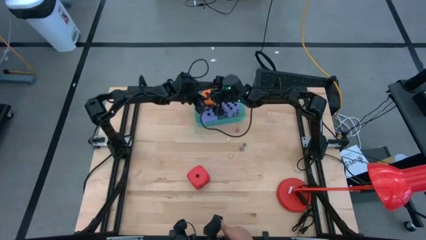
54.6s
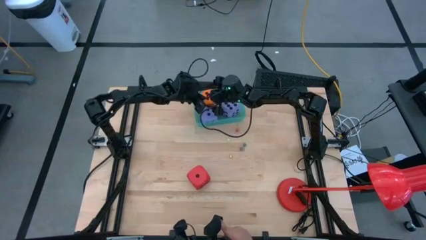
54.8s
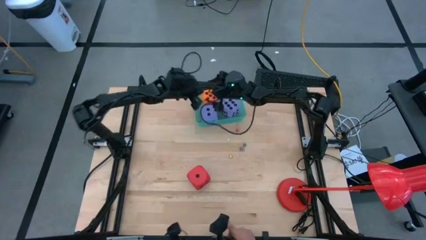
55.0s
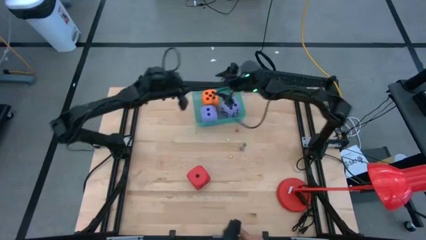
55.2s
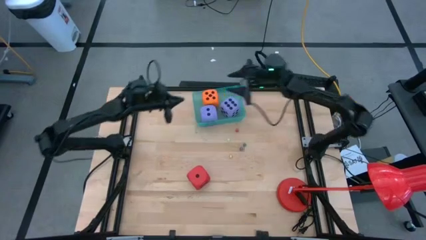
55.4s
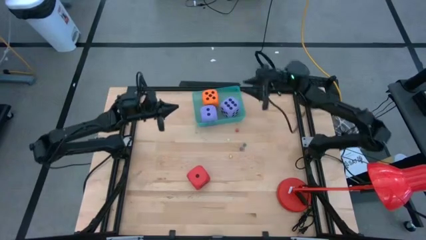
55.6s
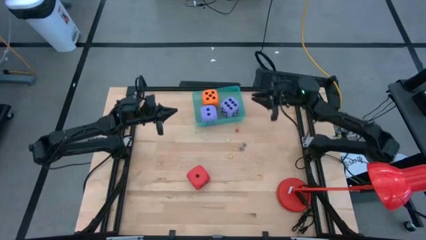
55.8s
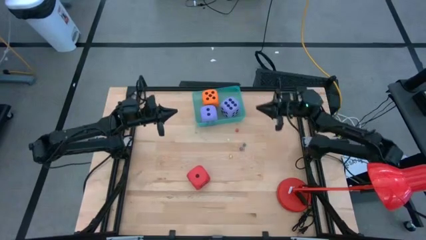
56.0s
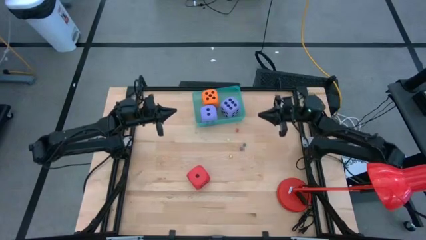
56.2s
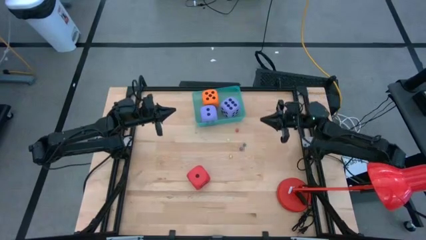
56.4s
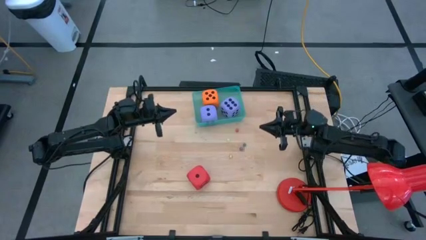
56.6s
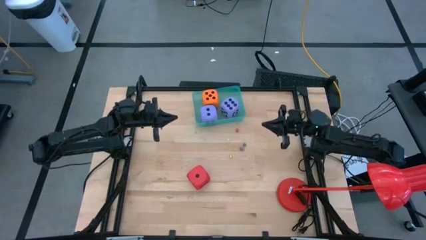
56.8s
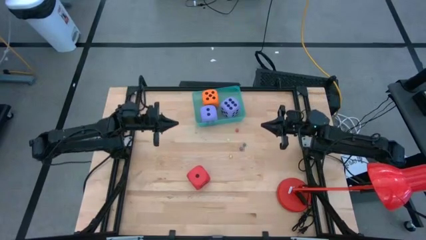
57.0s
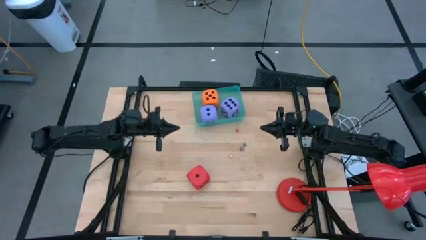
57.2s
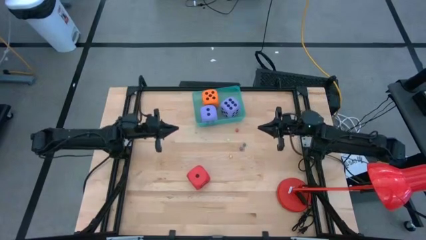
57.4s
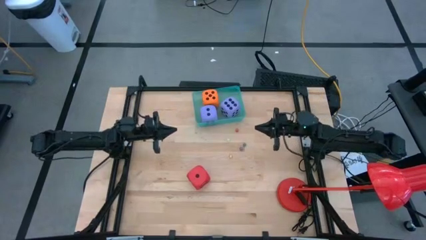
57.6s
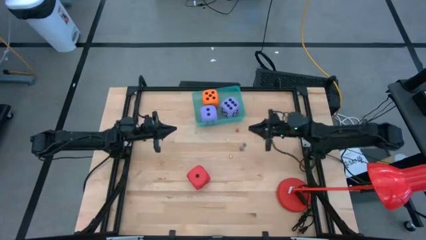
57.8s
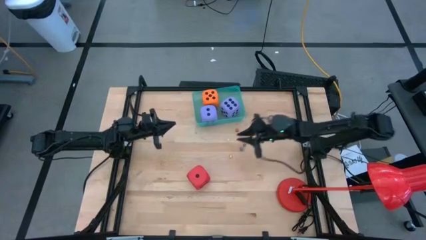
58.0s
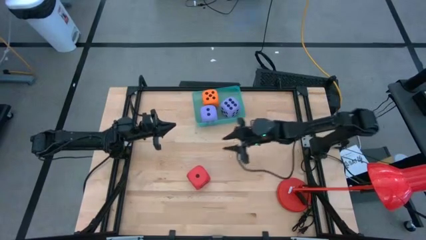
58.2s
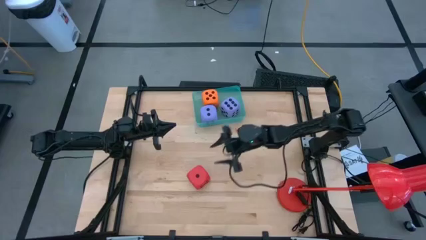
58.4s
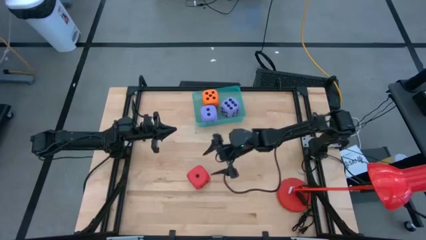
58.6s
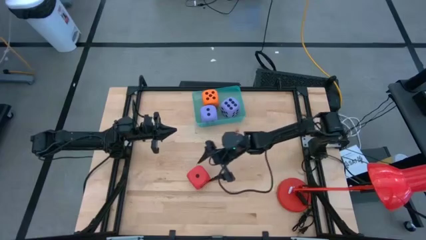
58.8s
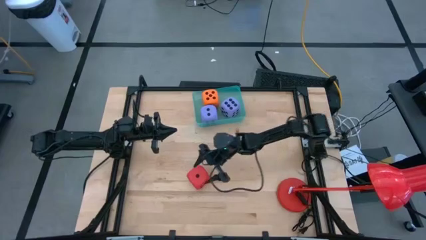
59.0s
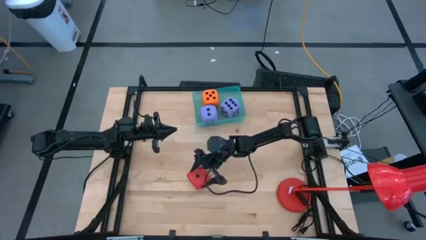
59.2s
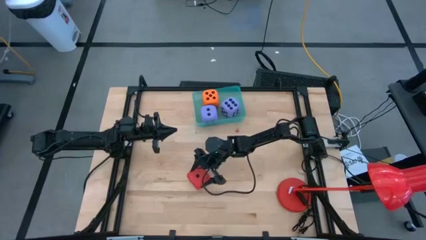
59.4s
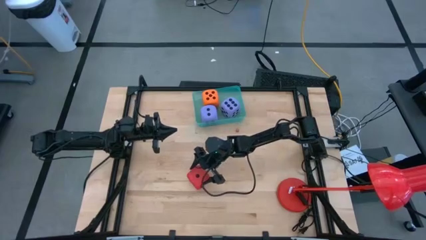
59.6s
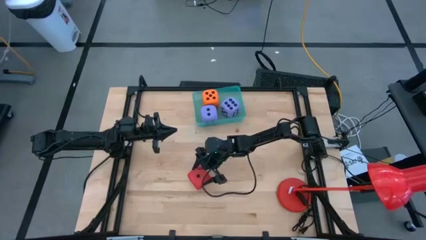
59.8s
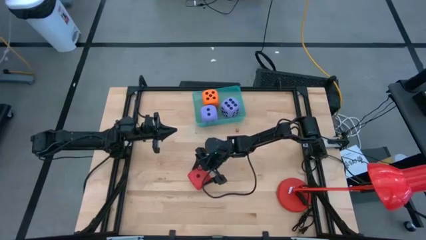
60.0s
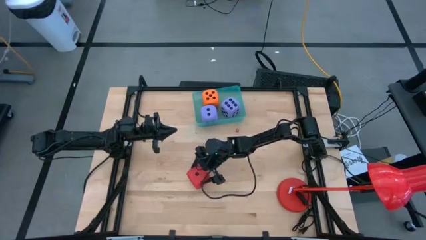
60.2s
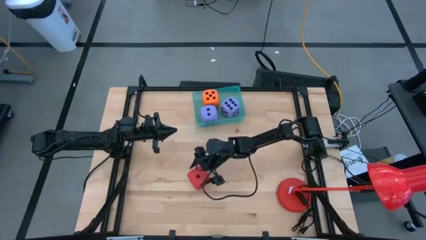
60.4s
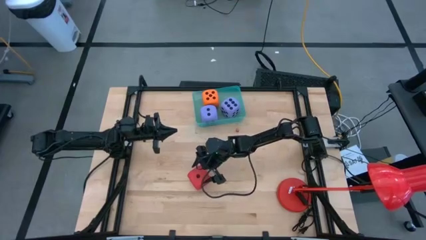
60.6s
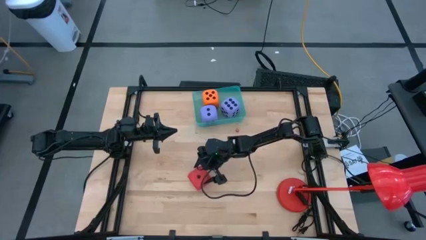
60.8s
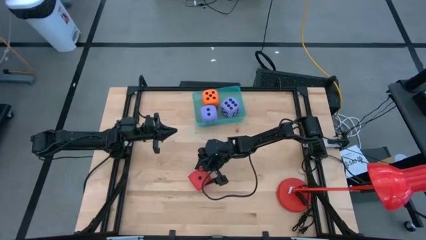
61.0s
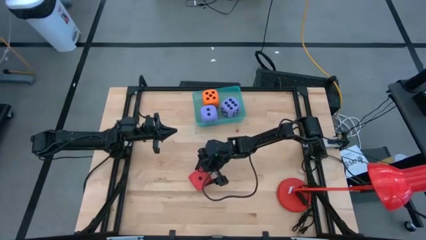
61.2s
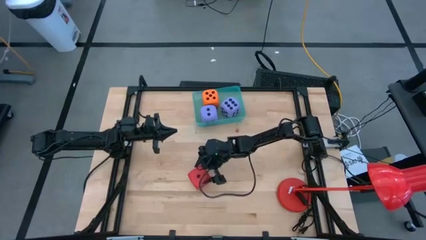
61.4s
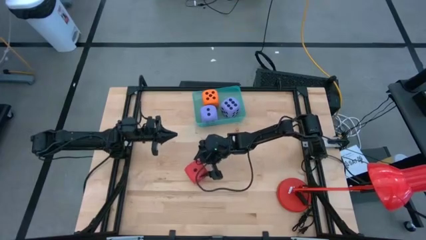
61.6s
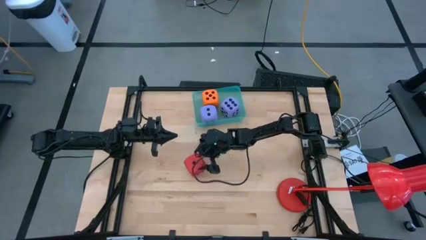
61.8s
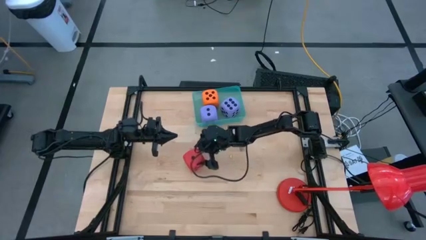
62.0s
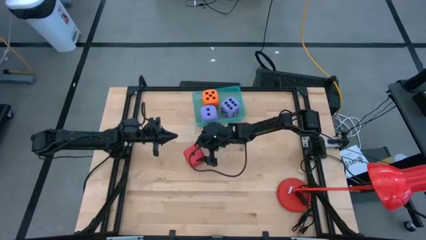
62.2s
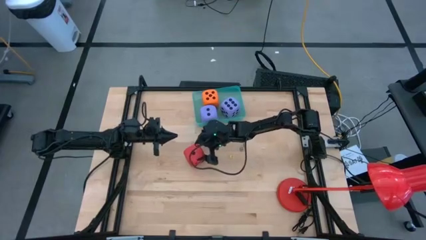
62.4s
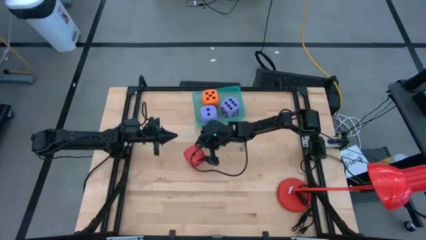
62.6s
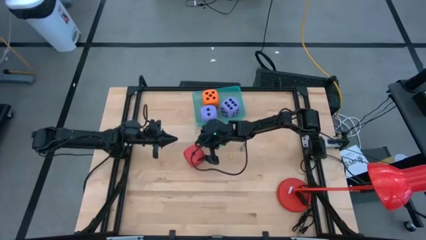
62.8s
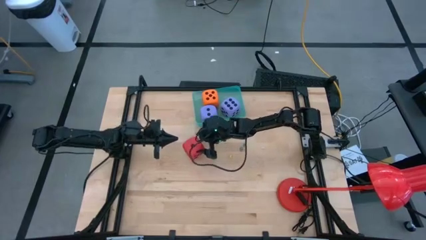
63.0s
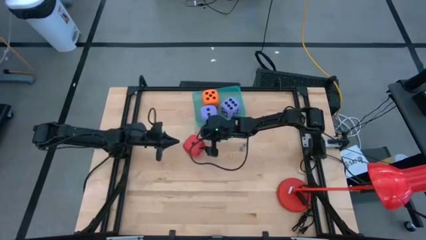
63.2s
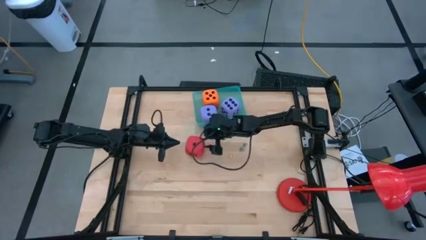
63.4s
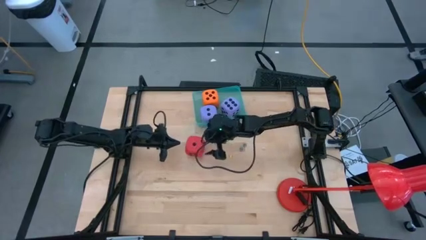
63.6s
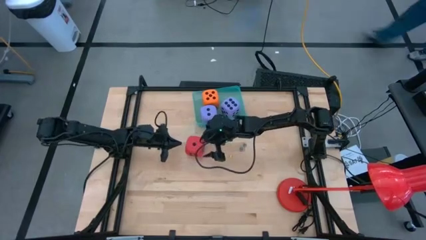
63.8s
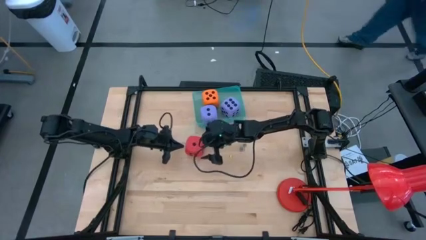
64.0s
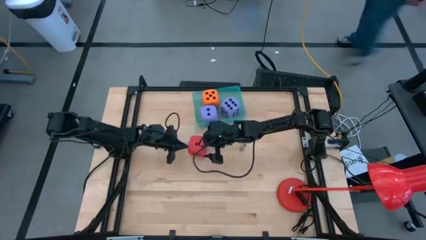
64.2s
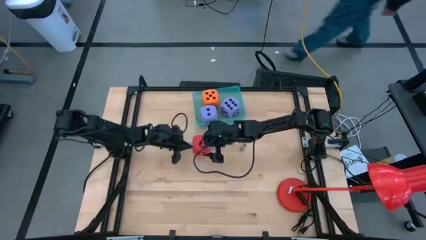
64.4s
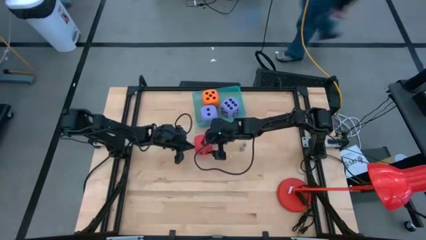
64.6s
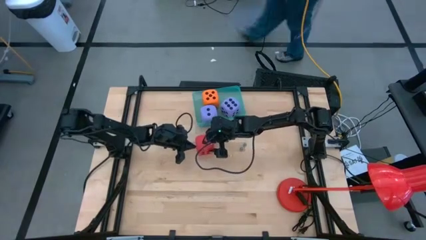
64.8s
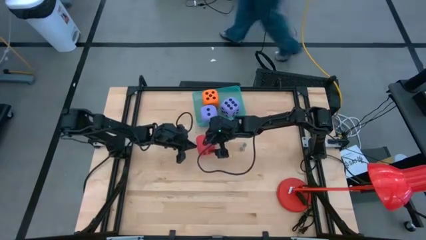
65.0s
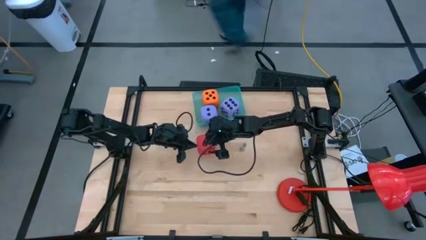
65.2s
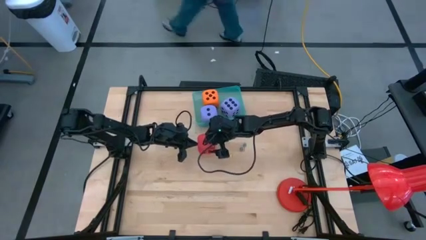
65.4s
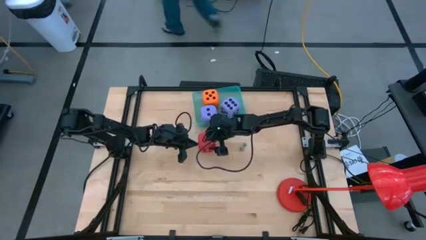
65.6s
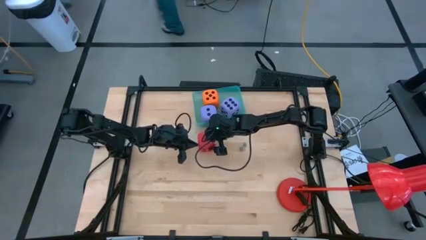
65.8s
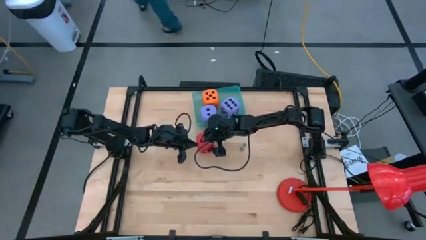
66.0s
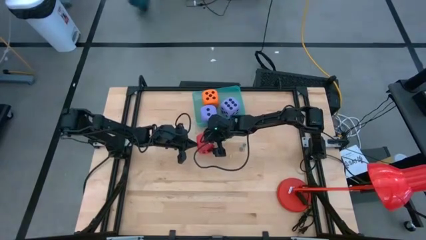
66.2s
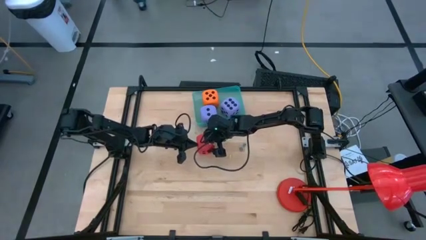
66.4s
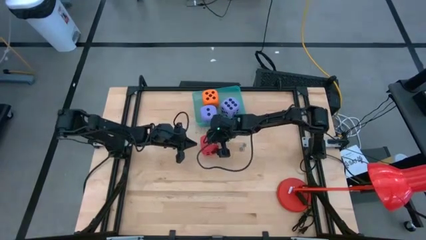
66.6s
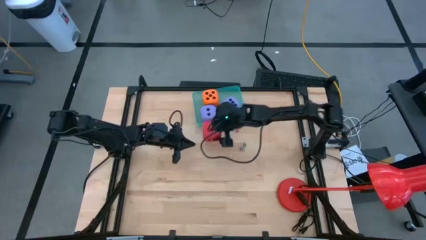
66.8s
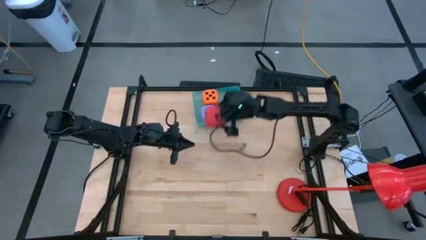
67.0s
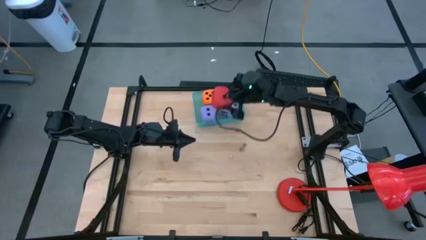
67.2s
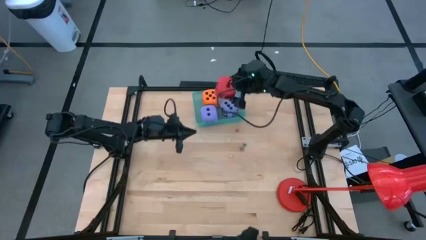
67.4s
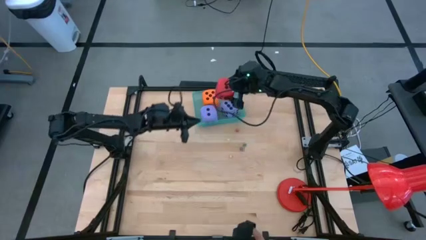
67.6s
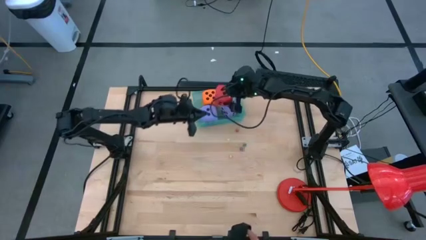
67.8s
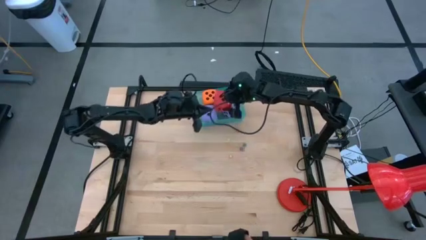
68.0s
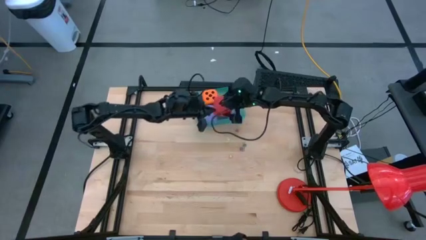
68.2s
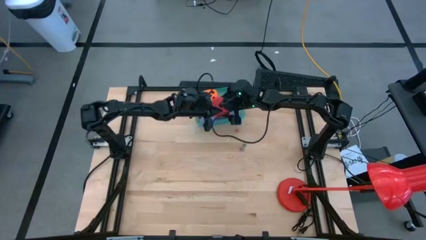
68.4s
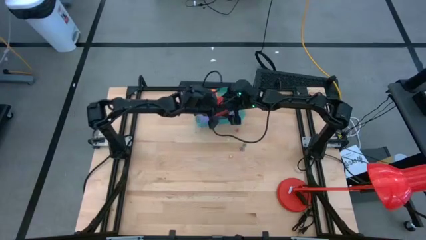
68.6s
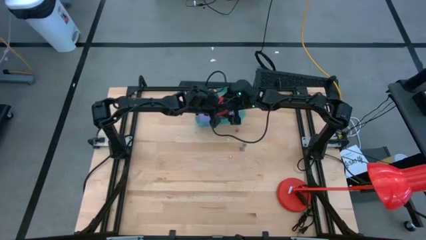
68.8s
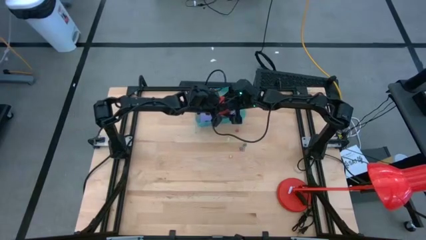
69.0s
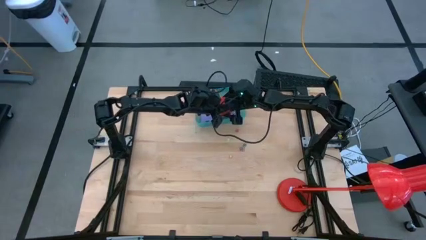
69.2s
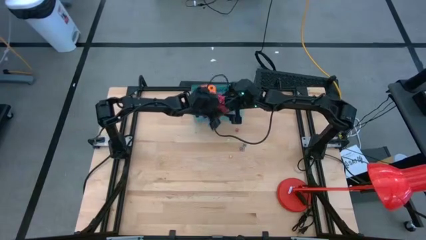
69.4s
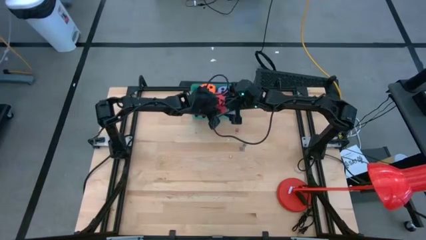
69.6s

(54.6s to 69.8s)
Task: Pick & Place Dice
Put the big red dice into the green bin

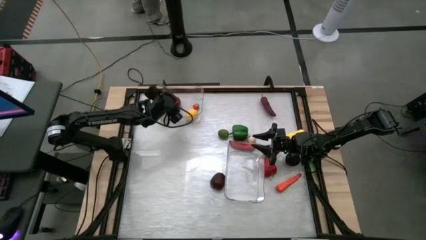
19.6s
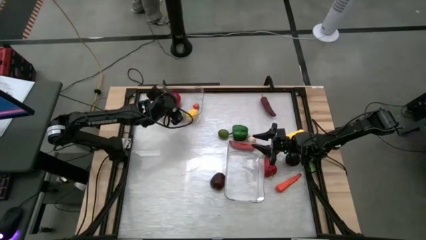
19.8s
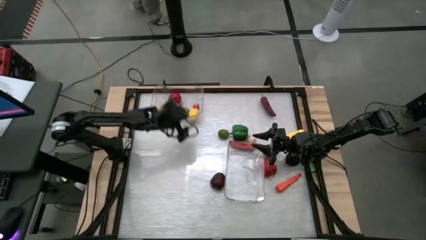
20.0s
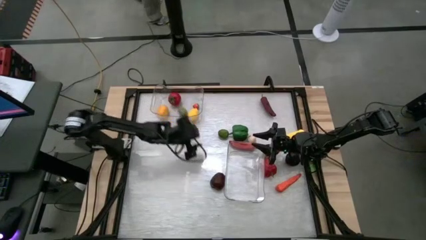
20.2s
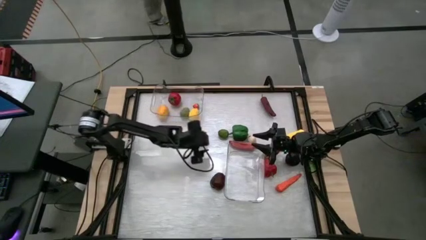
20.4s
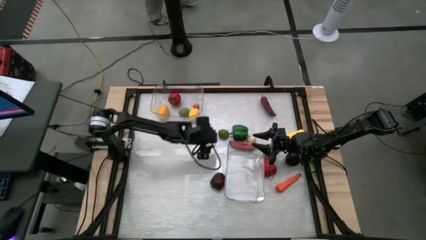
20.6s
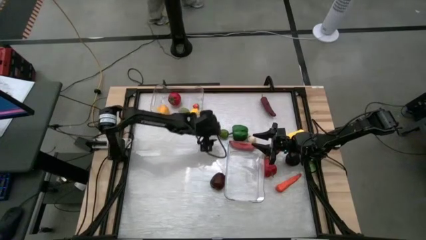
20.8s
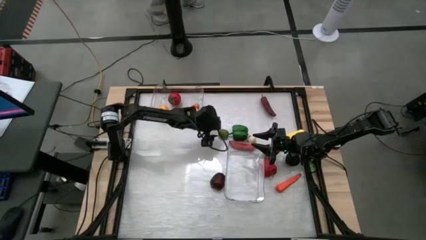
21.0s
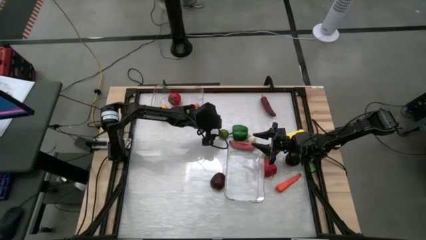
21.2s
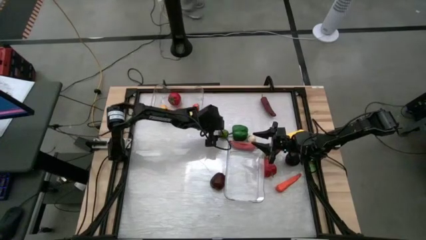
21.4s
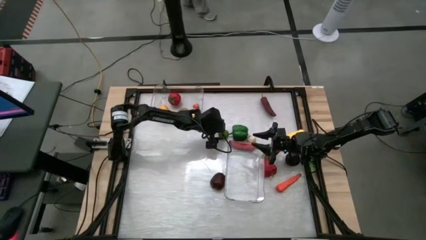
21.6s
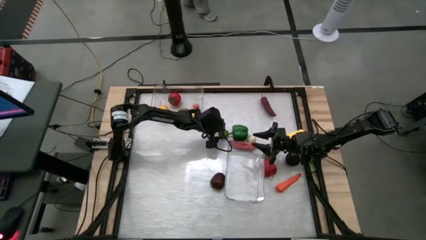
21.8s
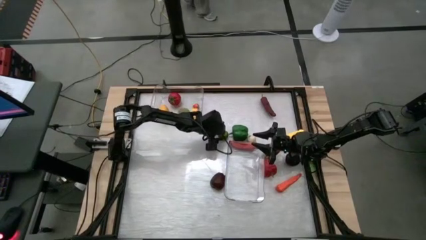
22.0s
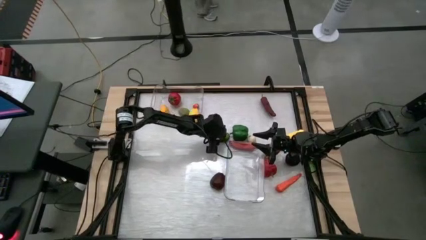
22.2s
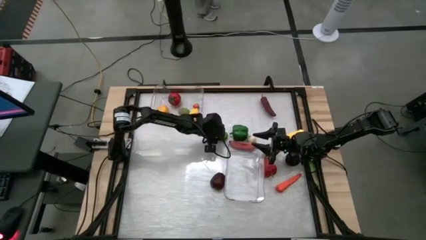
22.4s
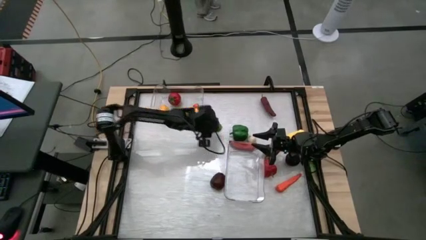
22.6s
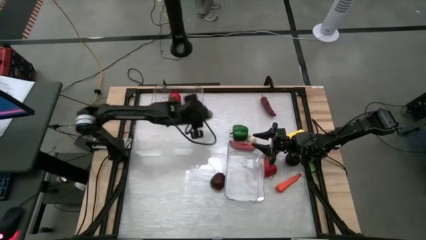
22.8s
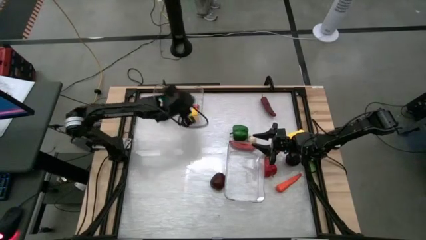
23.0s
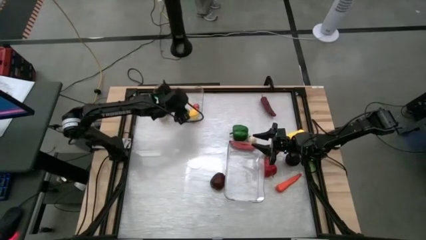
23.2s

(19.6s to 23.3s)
Task: Sort produce into baskets
Put the green lime into the top transparent bin
